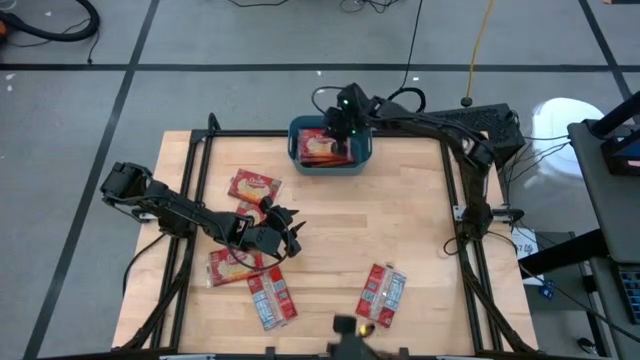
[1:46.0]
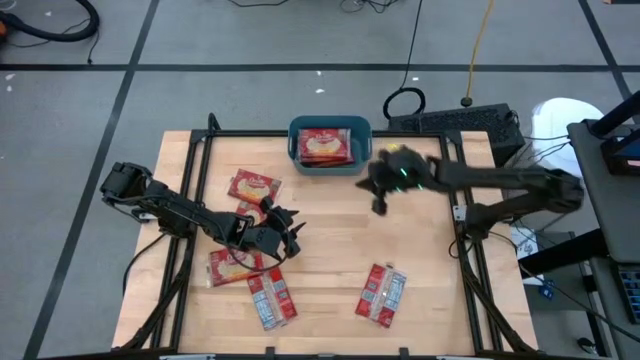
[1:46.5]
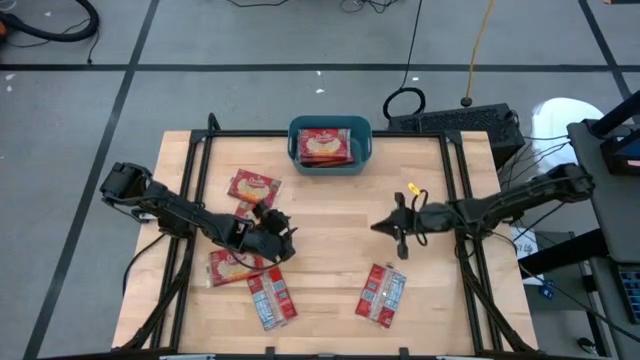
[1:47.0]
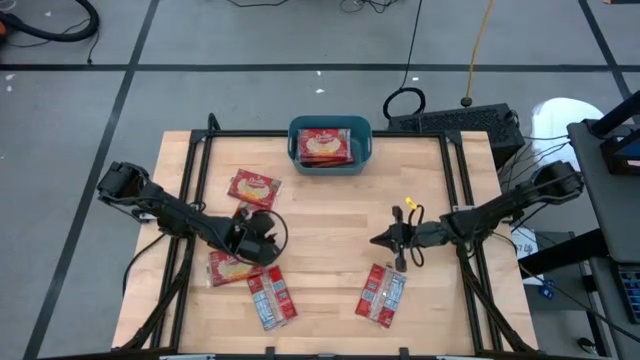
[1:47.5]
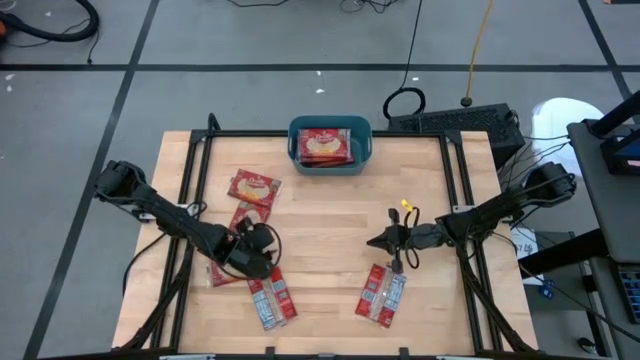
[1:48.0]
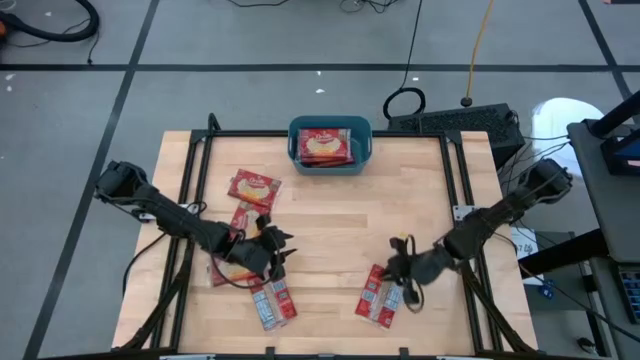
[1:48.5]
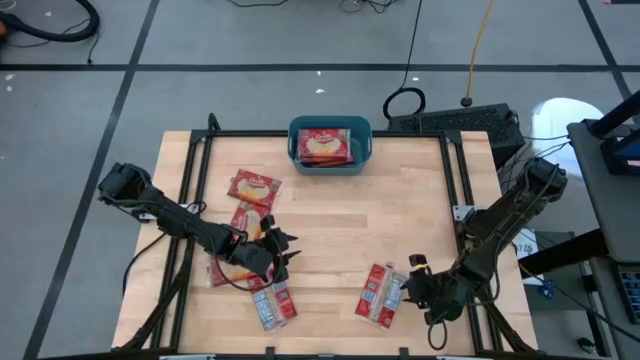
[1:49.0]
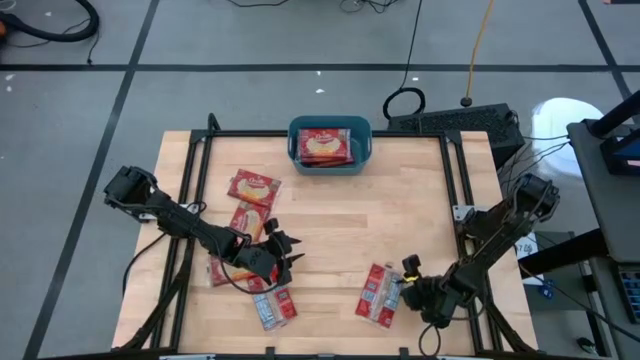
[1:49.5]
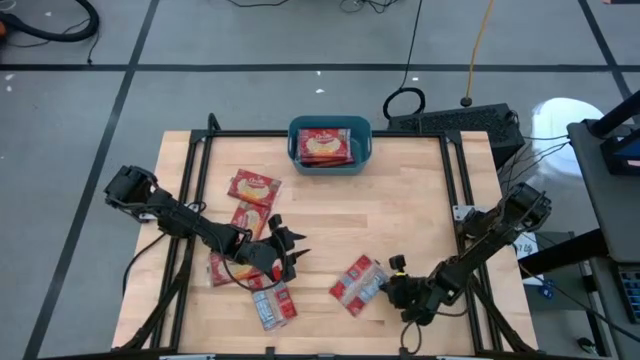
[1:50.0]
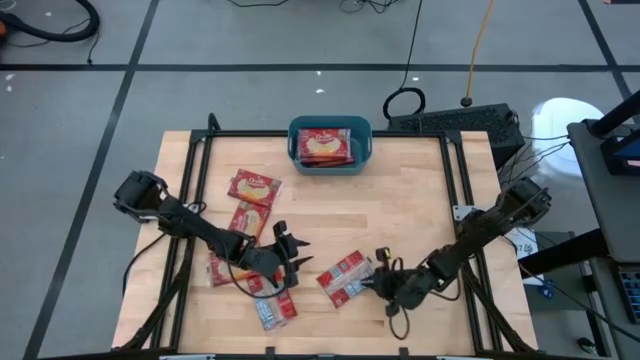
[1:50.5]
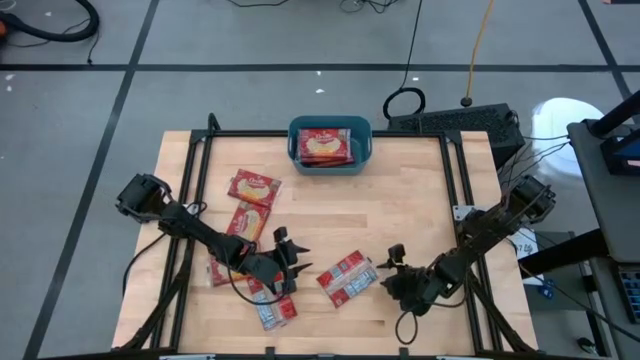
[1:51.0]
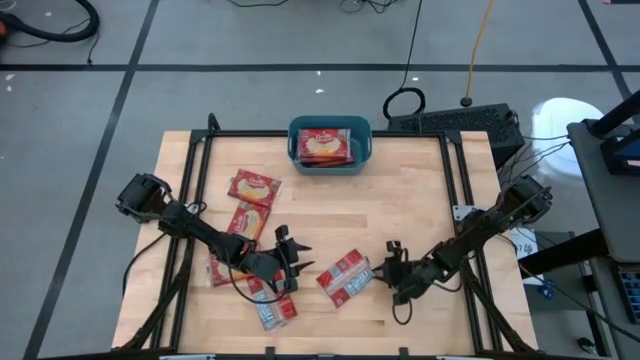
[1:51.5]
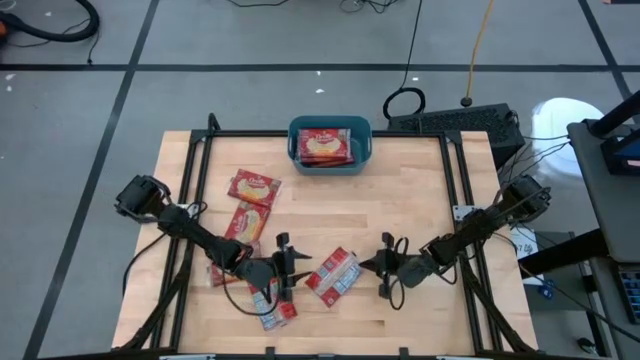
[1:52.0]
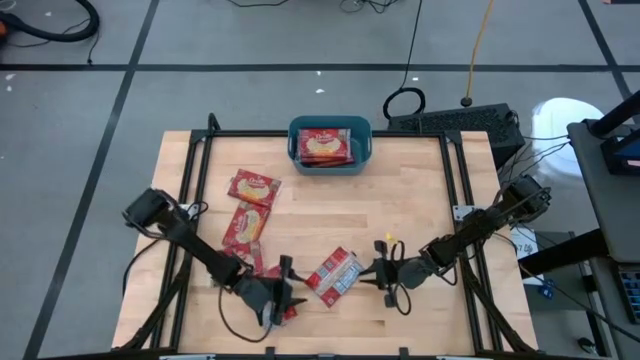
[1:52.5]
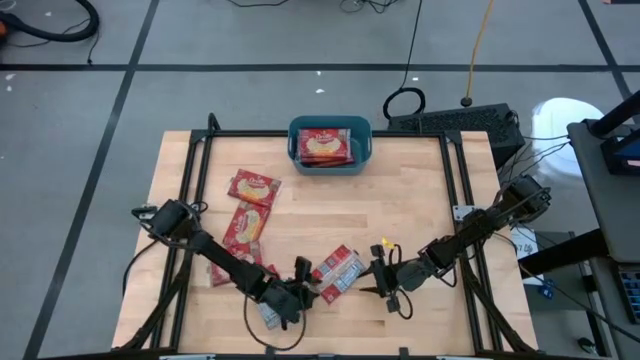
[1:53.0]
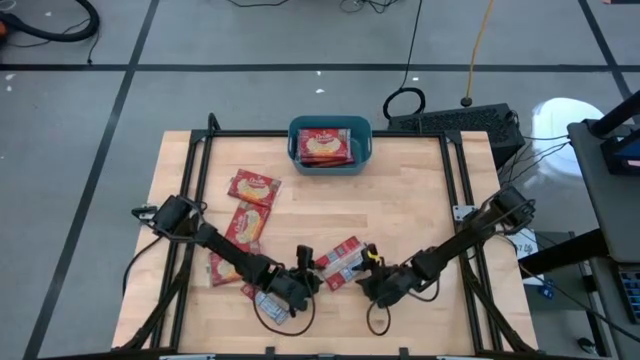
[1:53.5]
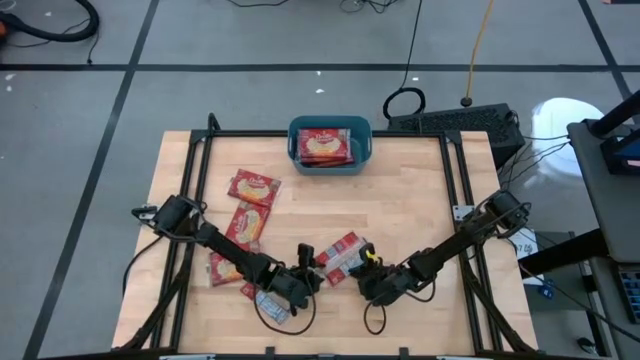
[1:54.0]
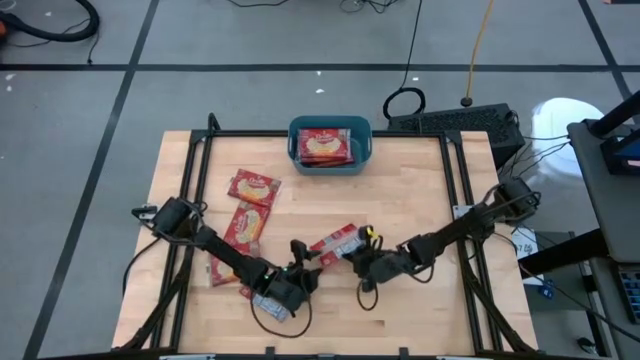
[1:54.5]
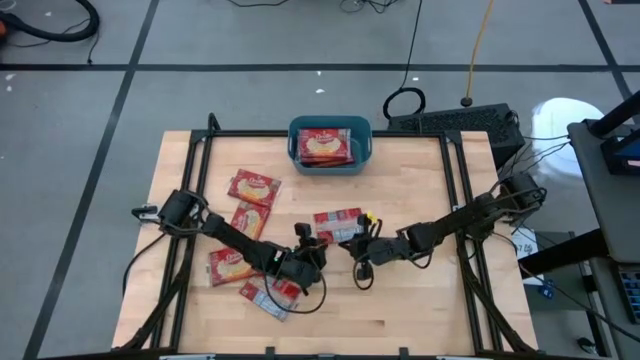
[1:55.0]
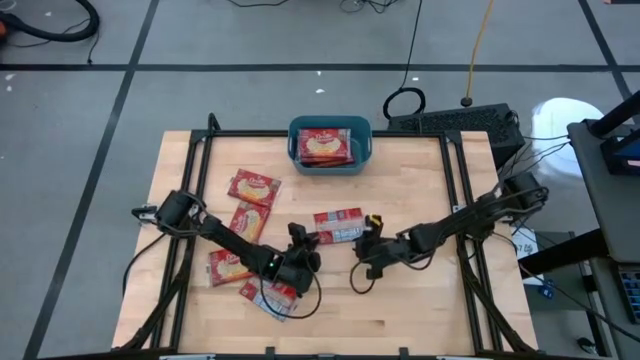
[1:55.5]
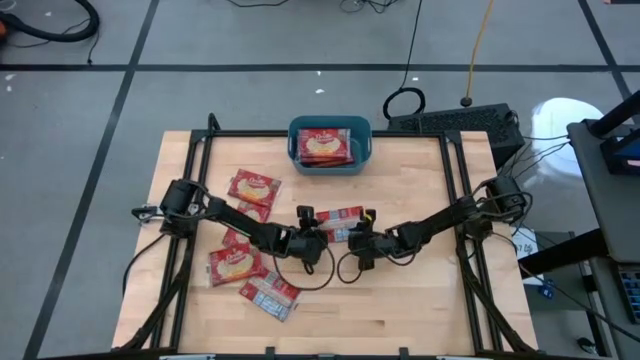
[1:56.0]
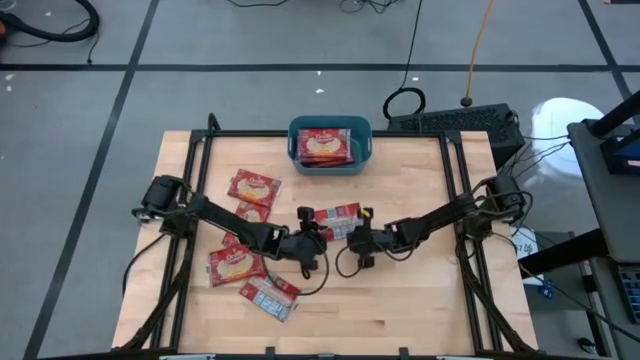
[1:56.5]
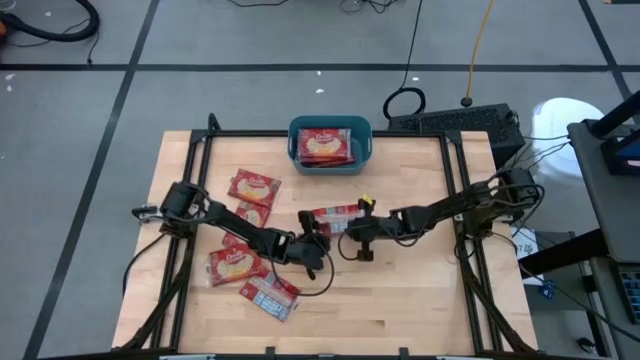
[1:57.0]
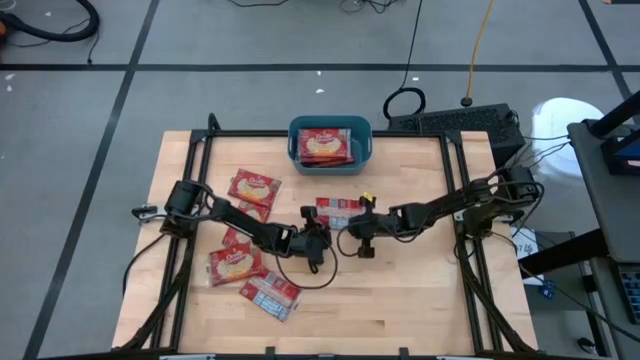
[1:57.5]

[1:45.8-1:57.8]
Task: Sort popcorn bags into baskets
Put the red popcorn bag into the blue bin

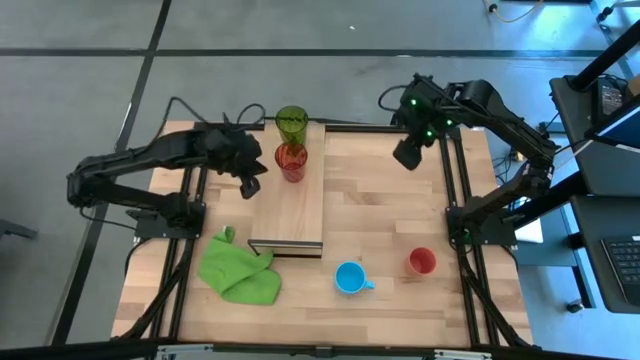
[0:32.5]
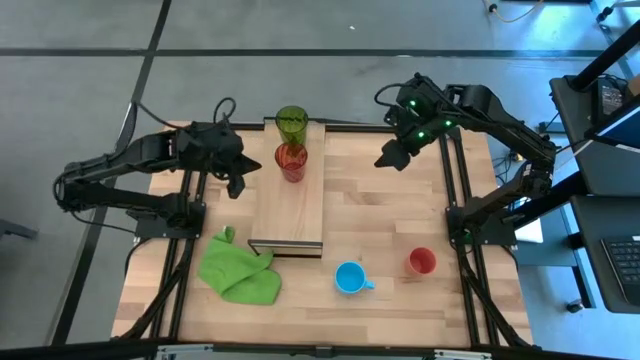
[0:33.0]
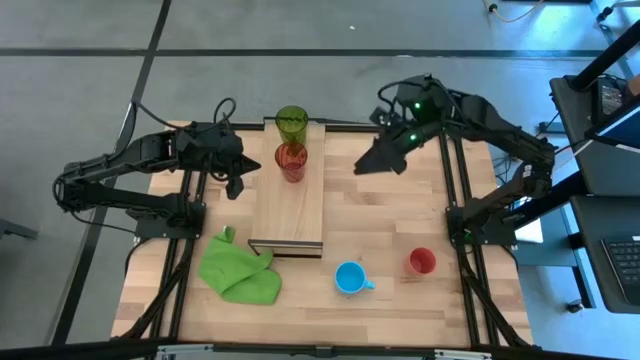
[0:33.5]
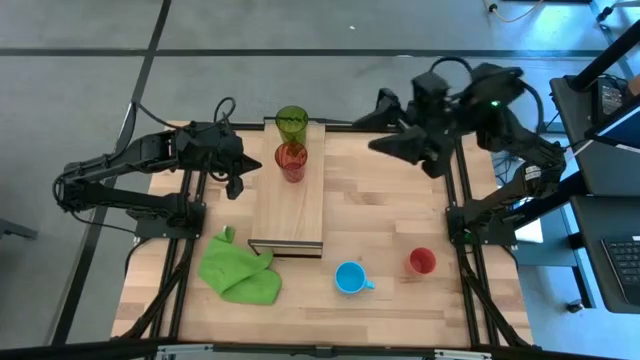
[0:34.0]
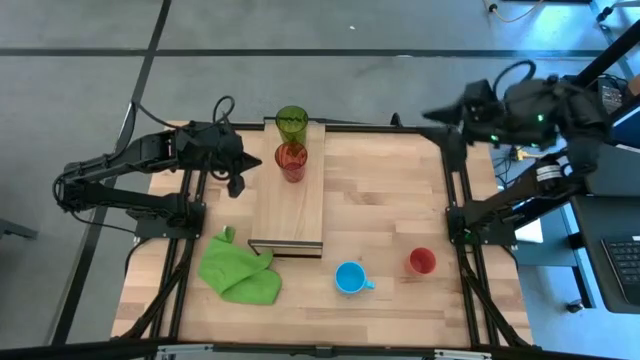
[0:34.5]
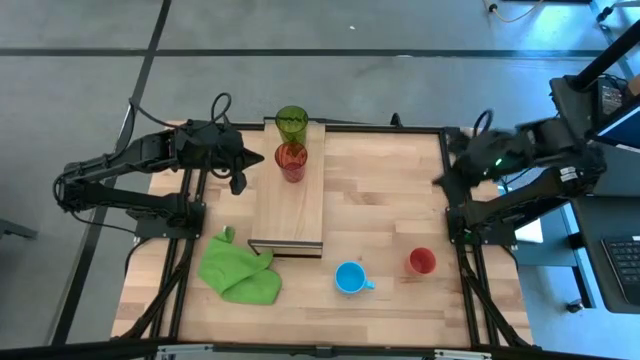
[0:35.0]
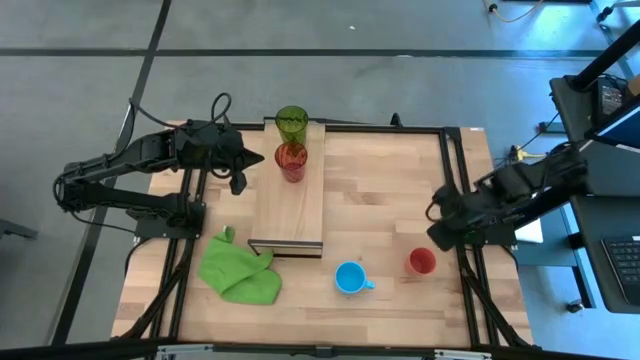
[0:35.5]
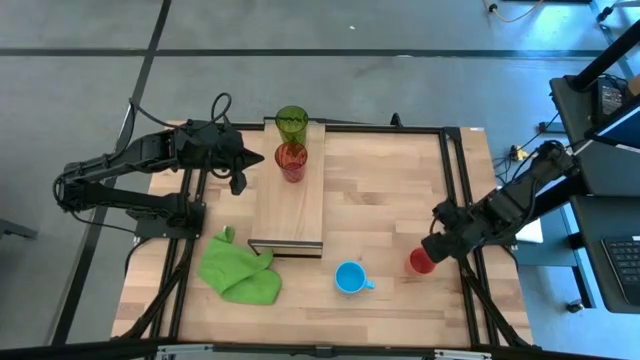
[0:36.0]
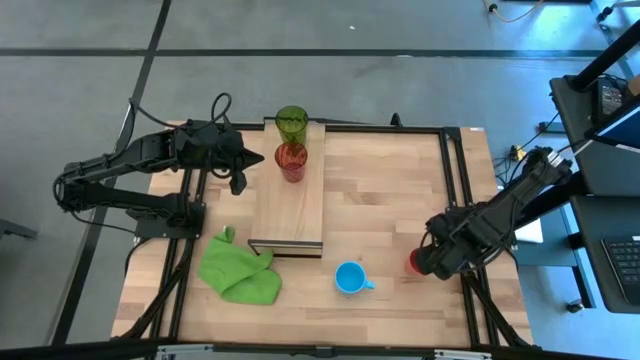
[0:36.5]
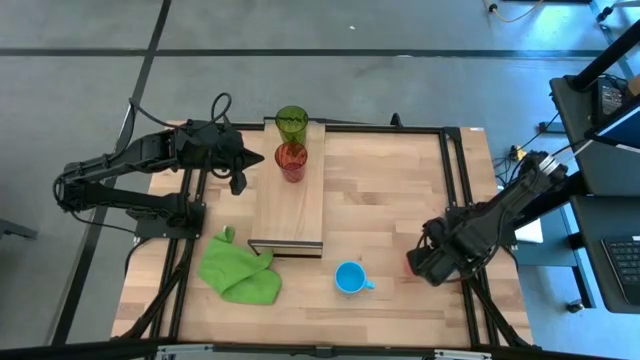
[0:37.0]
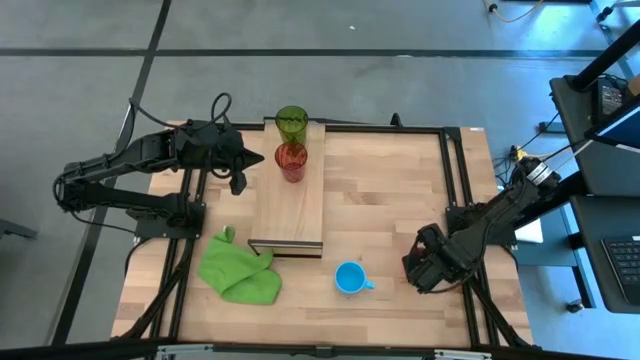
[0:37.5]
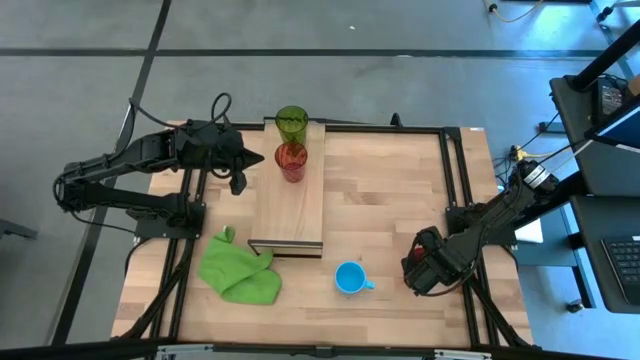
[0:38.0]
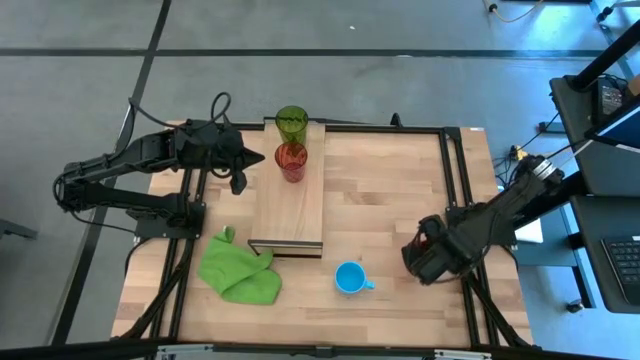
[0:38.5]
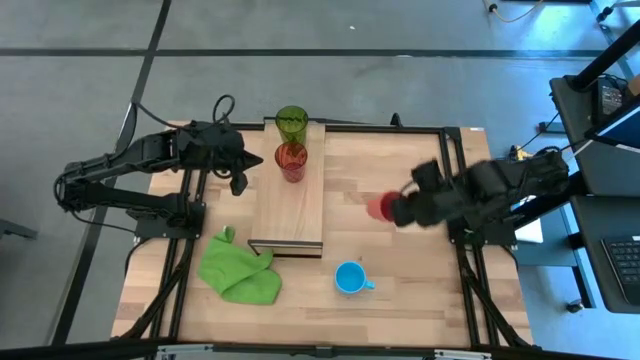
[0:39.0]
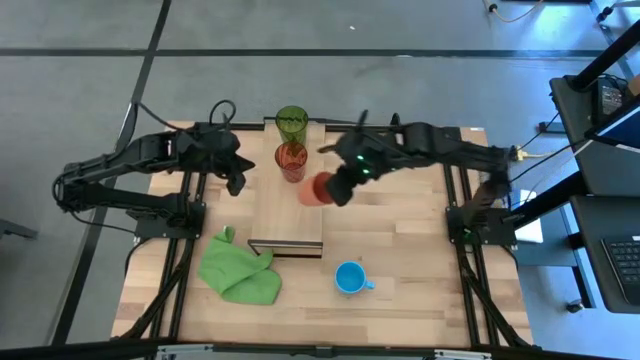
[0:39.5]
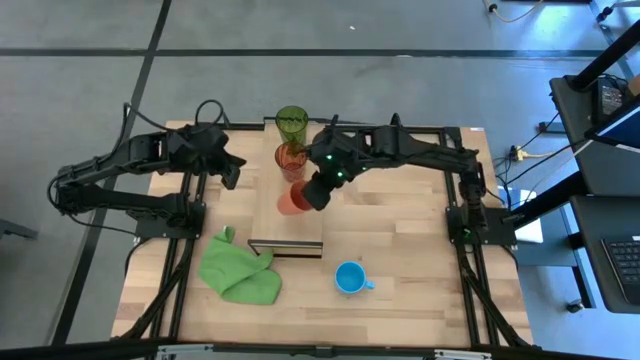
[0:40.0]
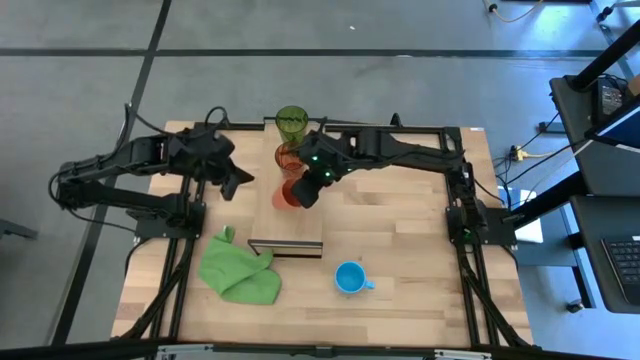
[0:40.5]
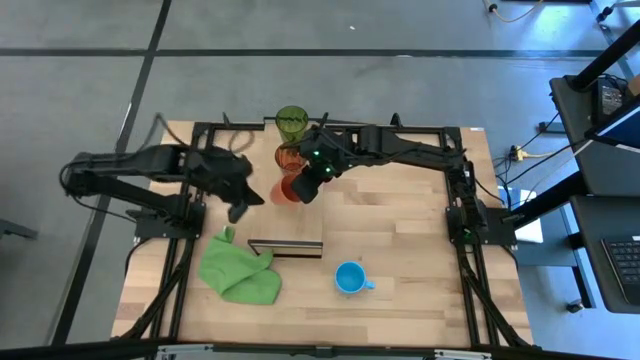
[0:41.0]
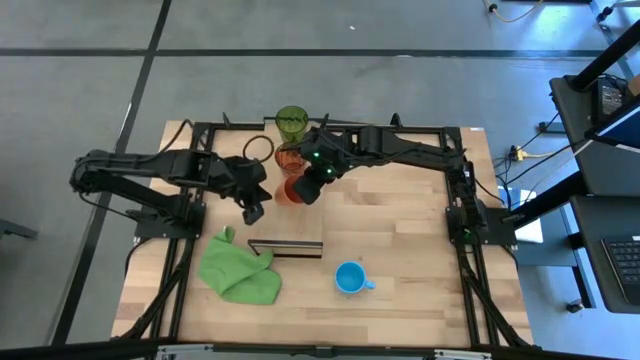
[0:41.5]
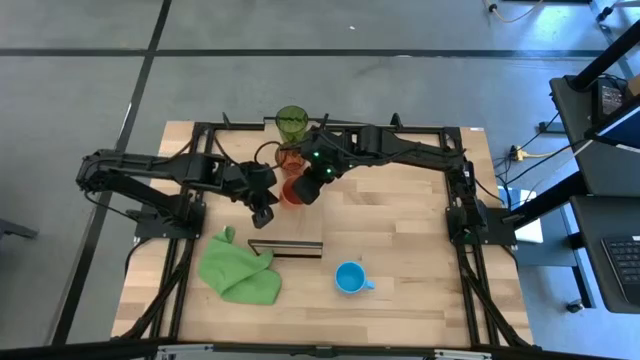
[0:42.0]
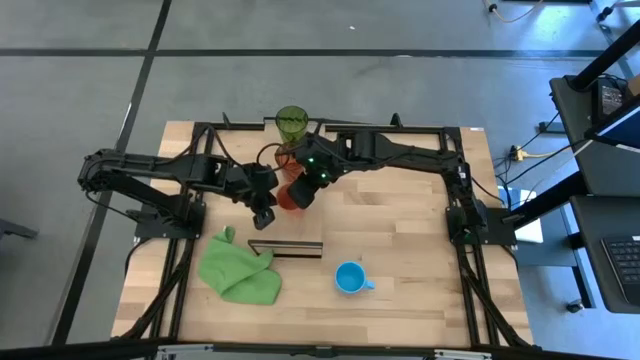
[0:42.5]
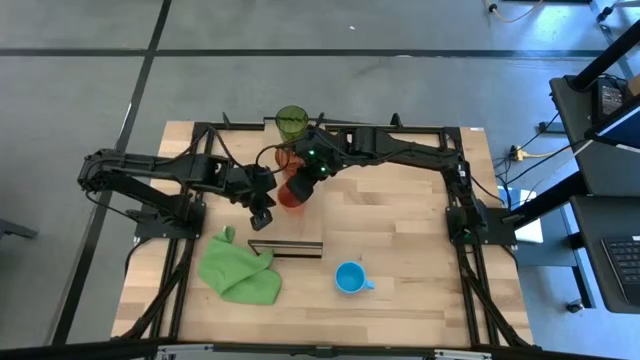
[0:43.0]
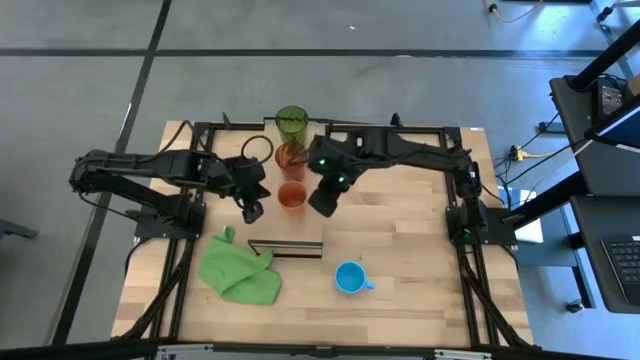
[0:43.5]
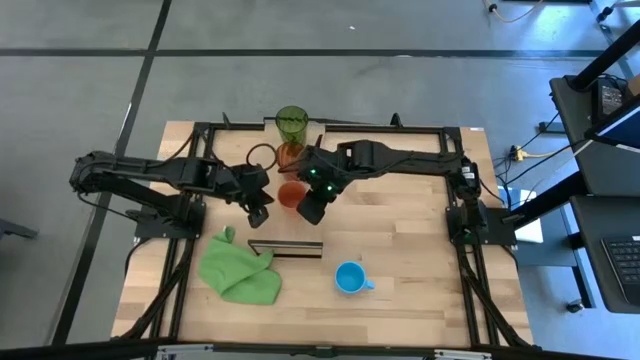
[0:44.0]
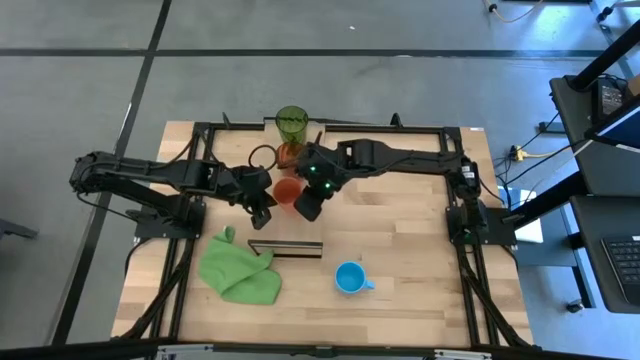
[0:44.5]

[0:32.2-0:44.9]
Task: Stack small to large cups/mugs on shelf
Put the orange cup on the shelf
